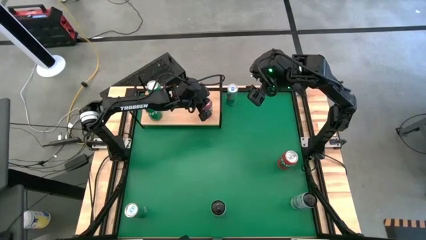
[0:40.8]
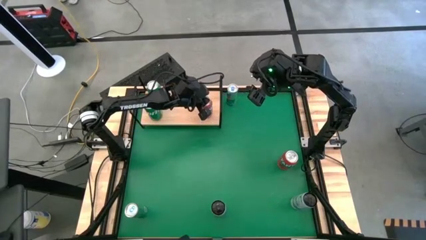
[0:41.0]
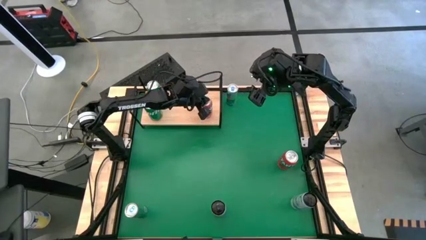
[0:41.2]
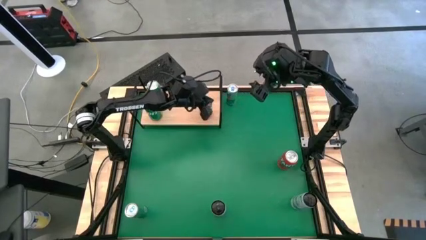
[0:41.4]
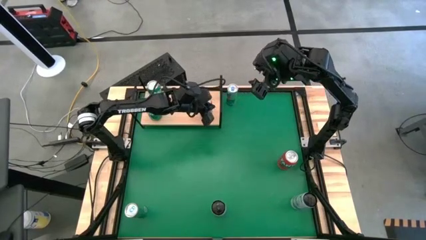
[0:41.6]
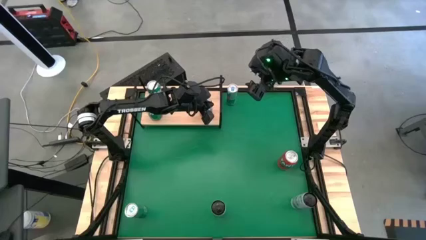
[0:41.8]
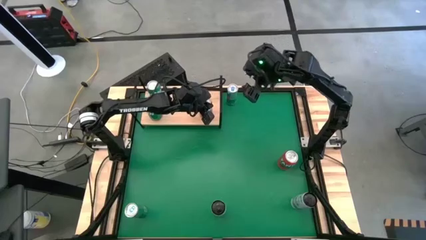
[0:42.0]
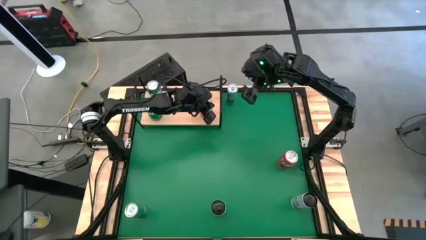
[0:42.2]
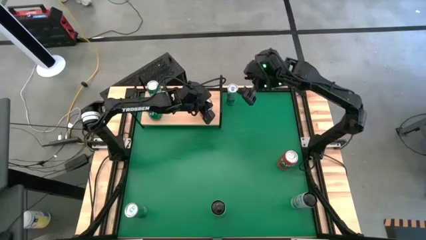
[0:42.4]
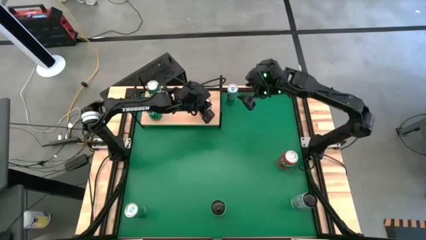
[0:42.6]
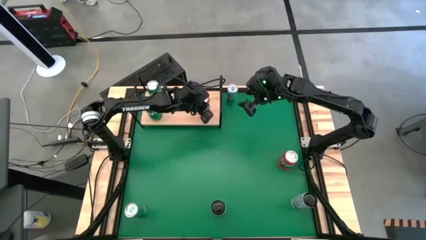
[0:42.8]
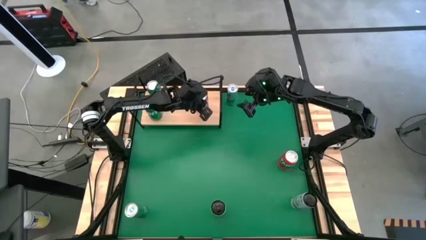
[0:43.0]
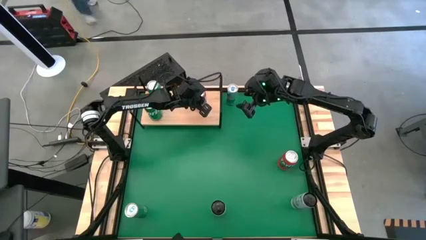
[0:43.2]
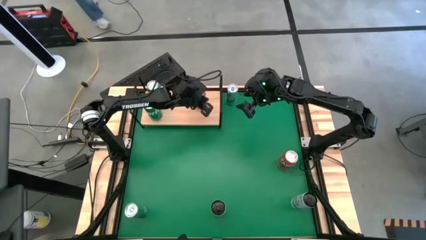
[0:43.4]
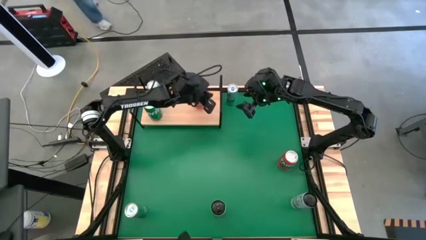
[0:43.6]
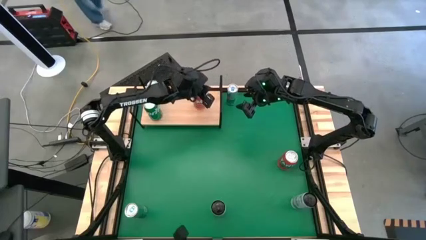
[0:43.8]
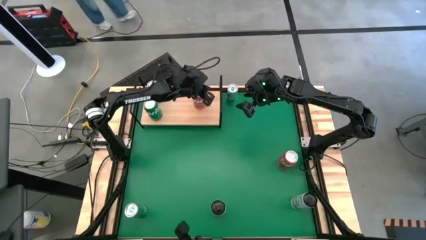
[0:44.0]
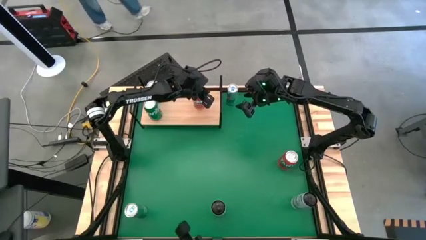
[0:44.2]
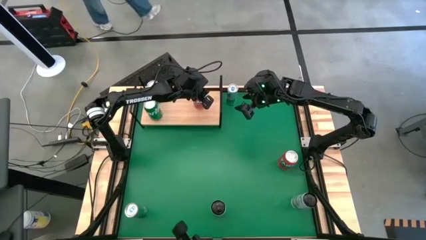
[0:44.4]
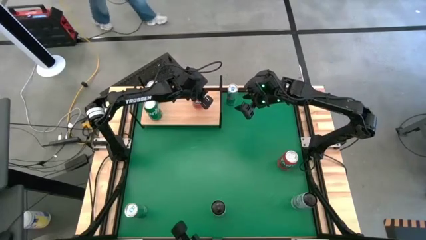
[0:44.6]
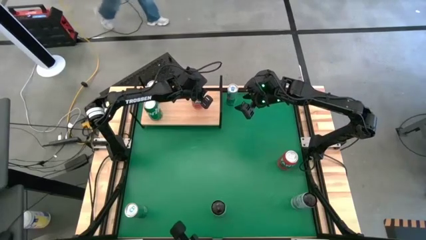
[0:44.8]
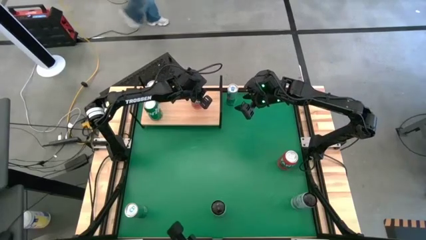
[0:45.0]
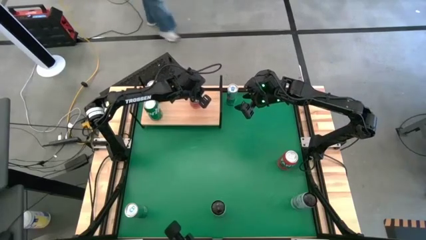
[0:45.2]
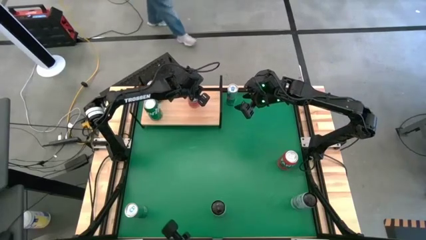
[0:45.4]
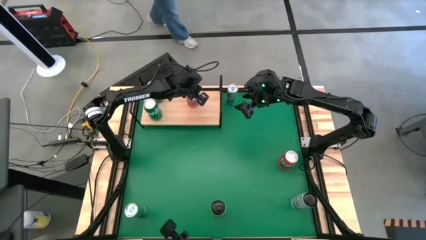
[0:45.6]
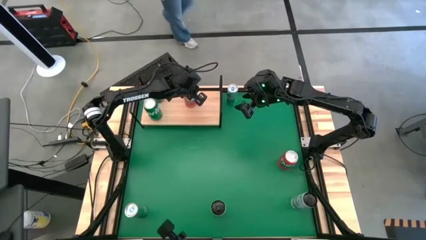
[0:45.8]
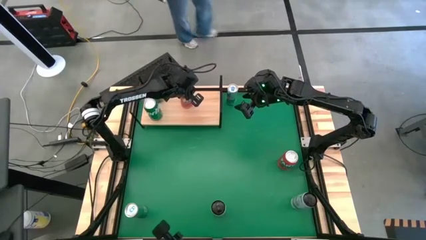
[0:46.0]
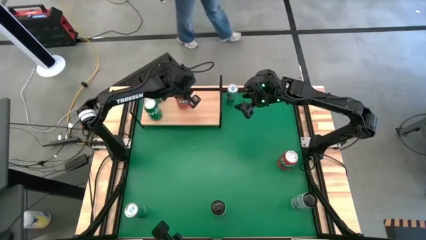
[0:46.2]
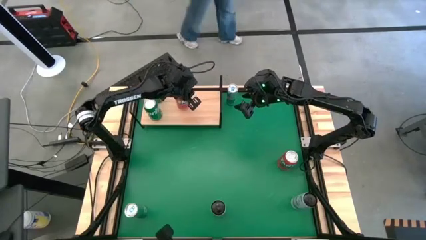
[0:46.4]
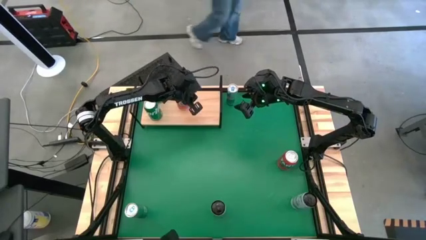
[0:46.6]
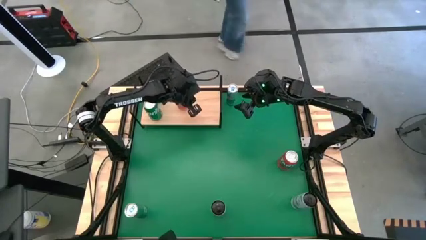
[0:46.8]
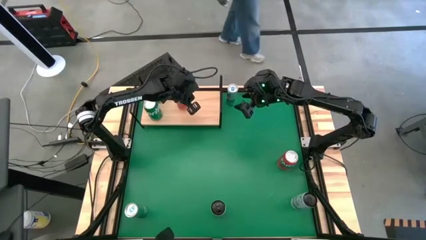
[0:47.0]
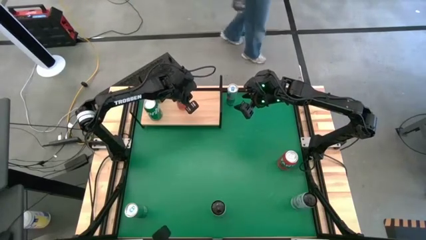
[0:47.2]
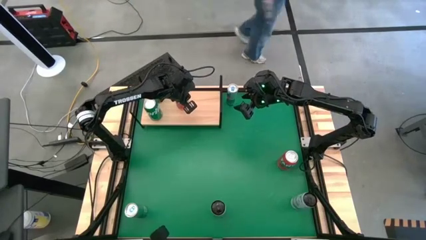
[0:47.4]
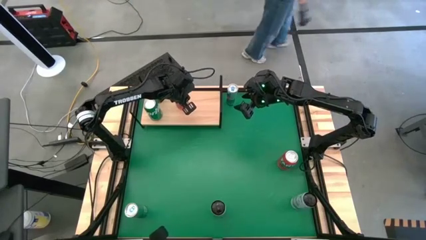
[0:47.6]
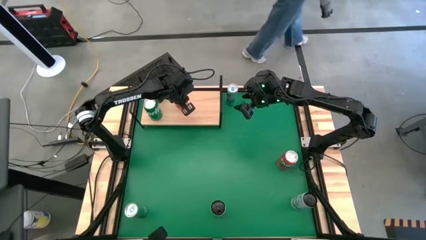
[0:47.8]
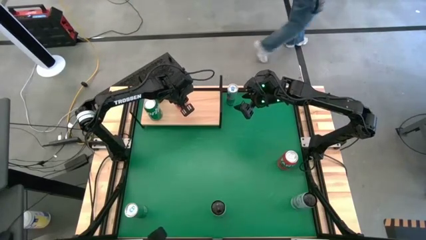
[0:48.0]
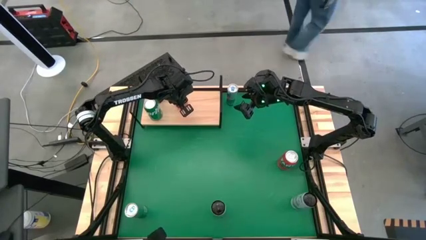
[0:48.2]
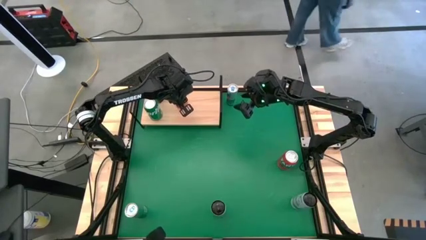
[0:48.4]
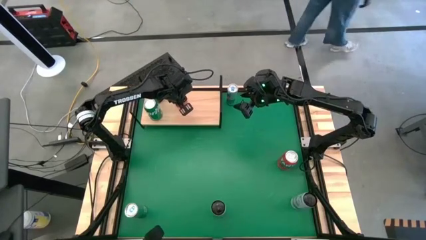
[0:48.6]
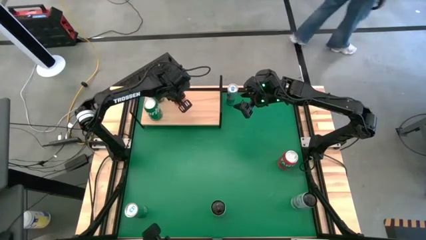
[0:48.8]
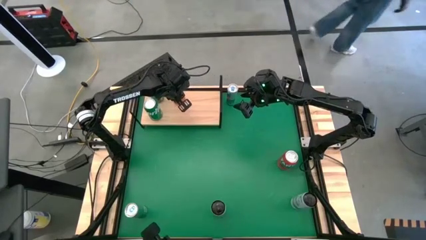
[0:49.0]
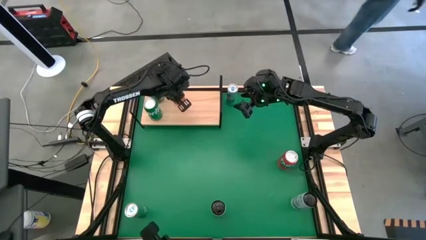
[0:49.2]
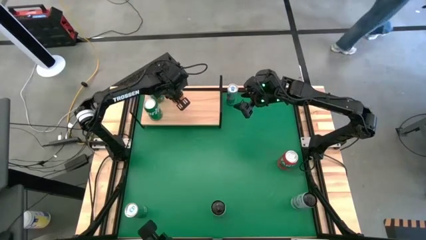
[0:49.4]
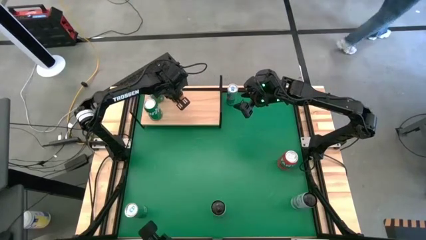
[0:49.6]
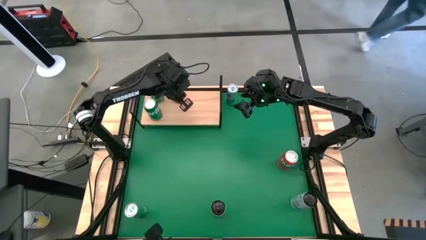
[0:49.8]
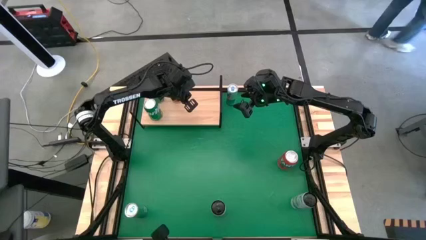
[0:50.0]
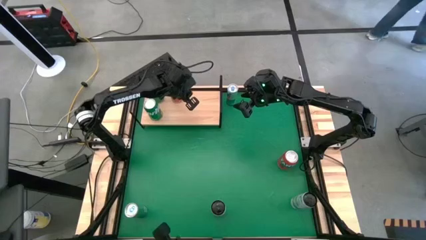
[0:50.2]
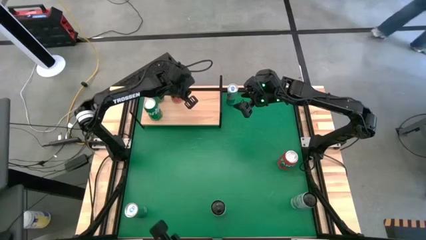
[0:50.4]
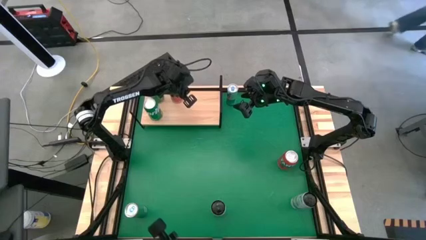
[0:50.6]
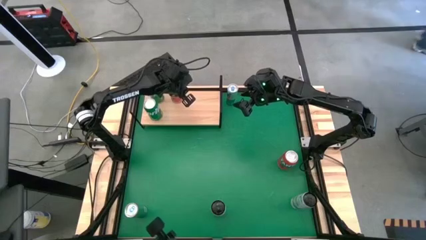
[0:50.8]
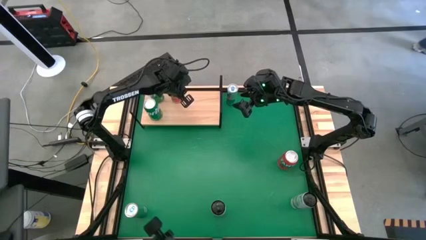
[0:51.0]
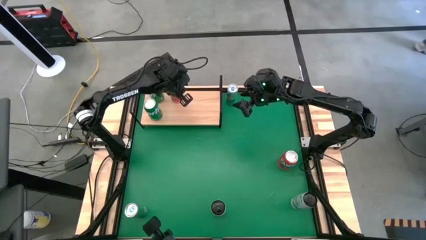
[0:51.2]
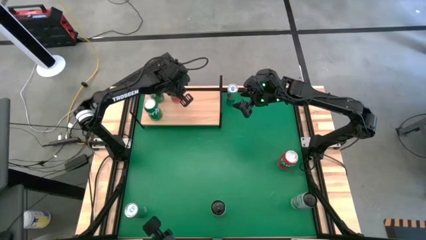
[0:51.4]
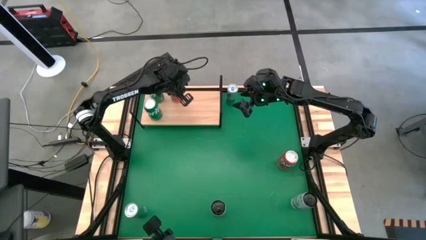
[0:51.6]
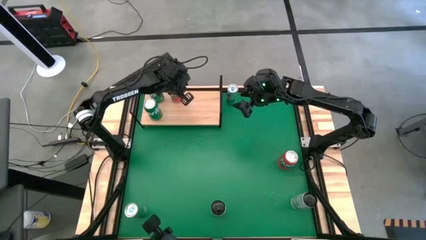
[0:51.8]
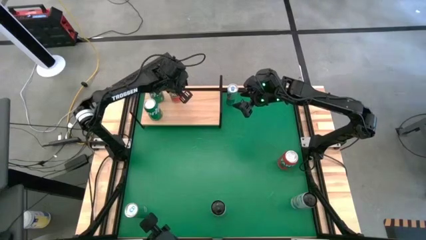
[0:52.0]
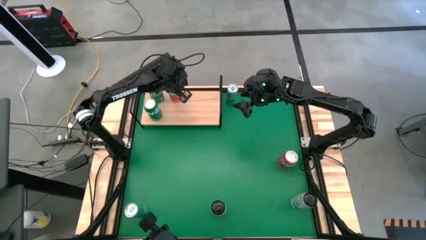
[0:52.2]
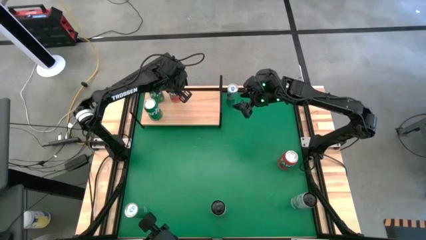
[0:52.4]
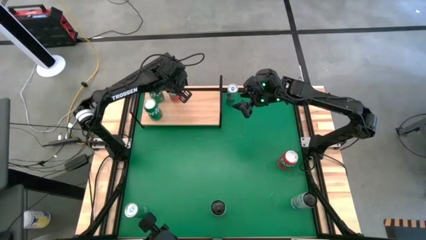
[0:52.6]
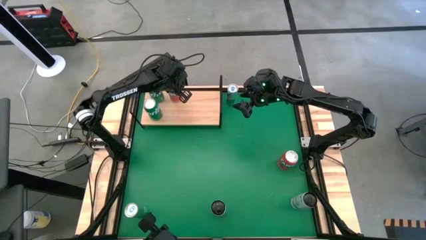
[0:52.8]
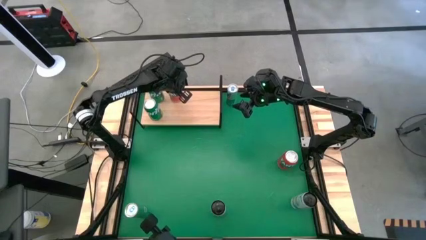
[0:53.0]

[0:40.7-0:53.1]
Task: Place canned beverage on shelf
Put the top orange soda can on the shelf
